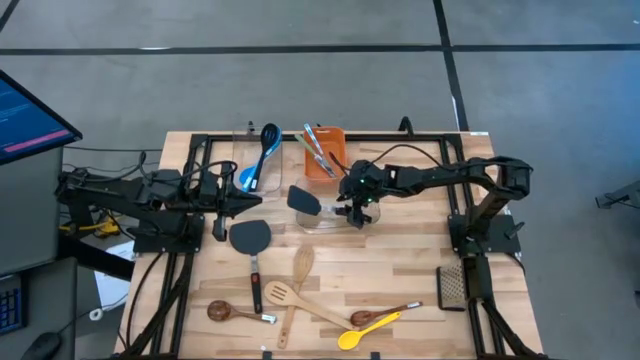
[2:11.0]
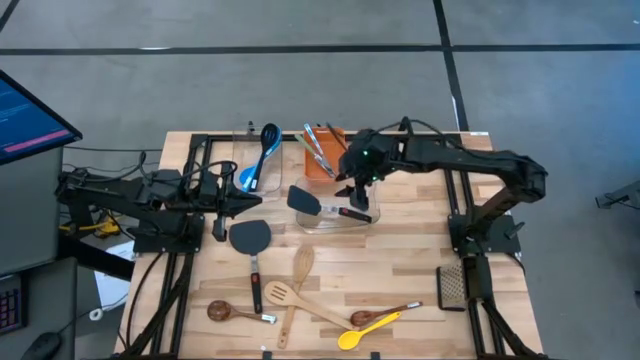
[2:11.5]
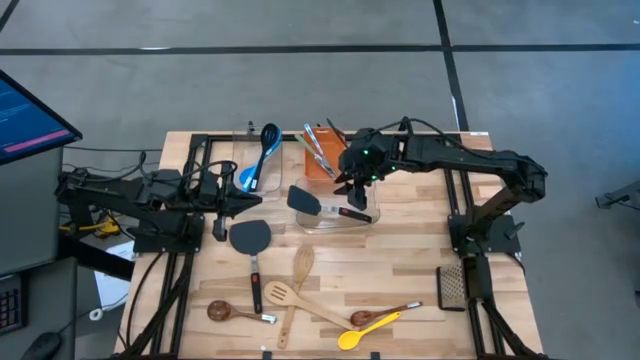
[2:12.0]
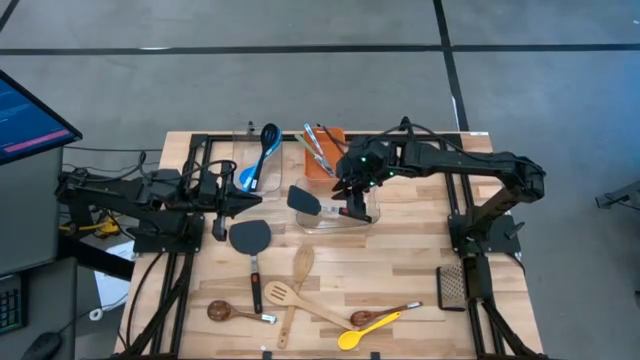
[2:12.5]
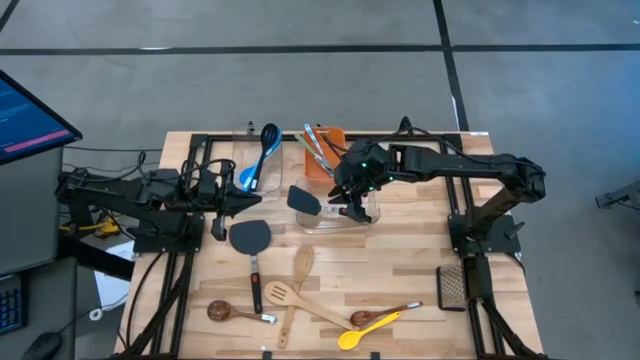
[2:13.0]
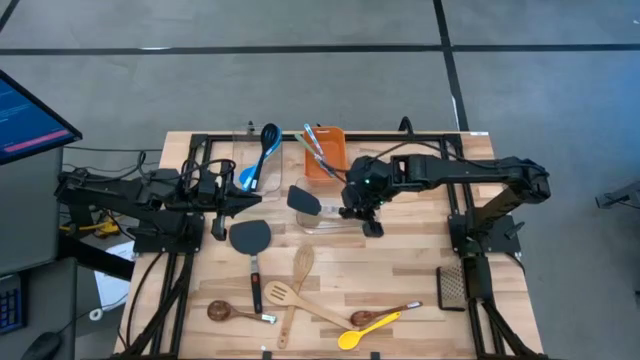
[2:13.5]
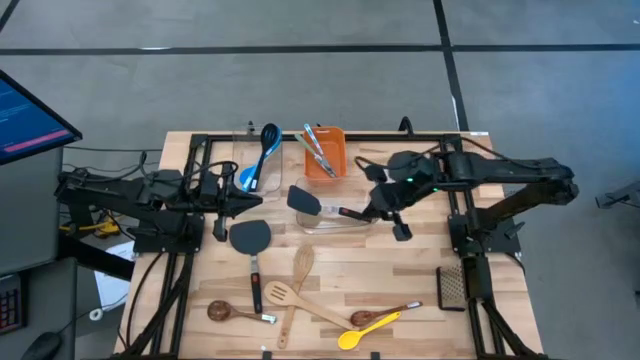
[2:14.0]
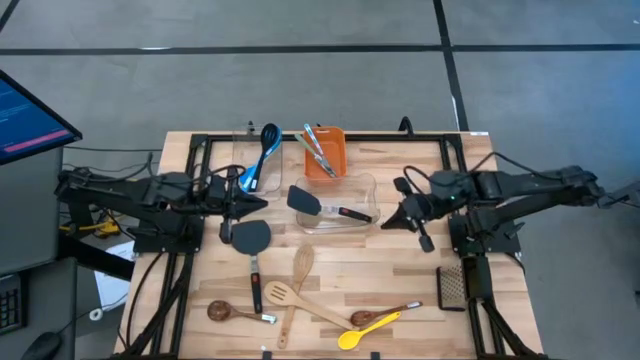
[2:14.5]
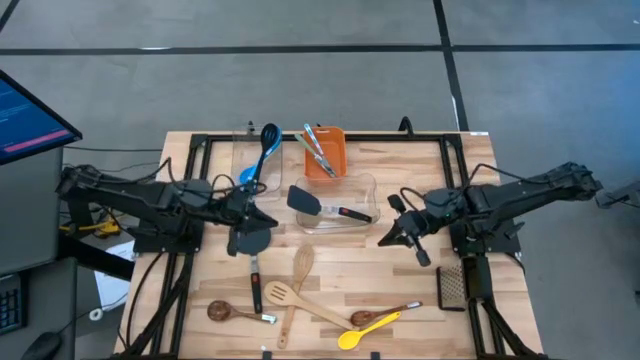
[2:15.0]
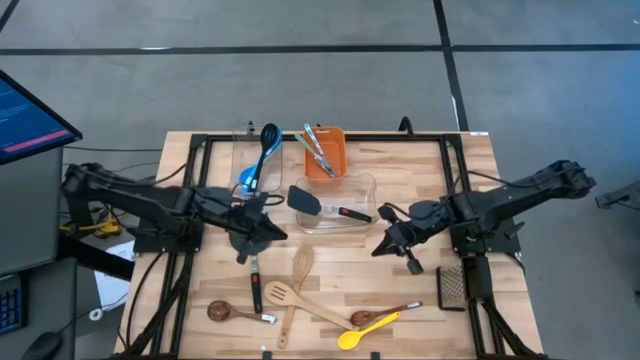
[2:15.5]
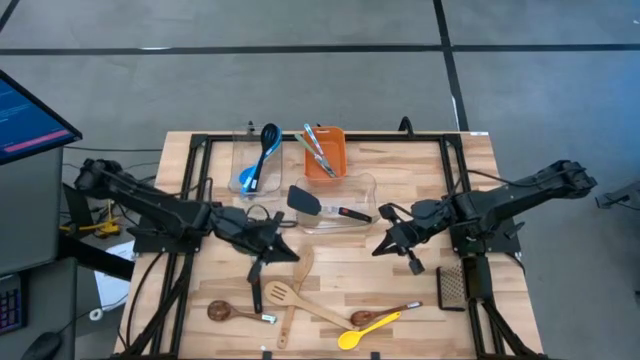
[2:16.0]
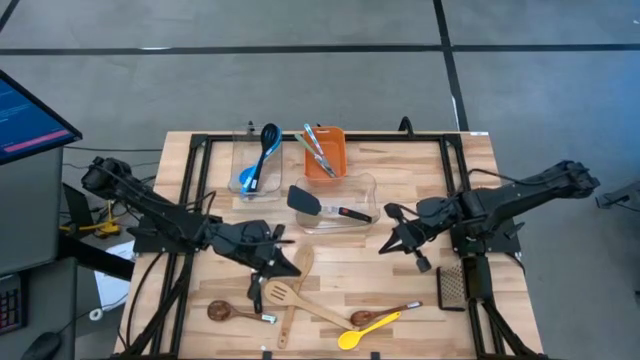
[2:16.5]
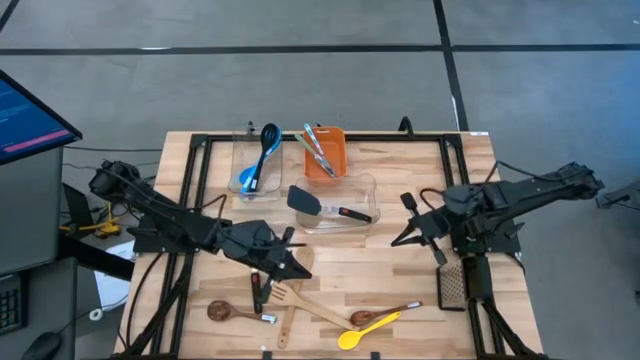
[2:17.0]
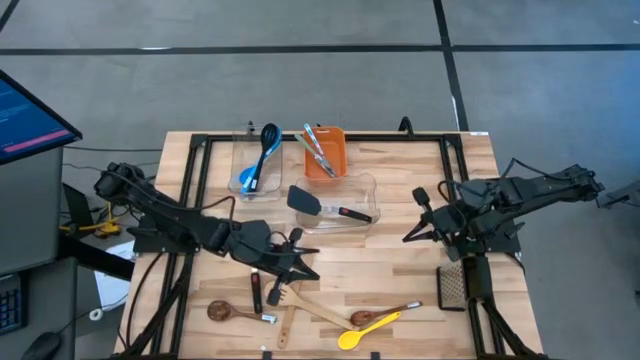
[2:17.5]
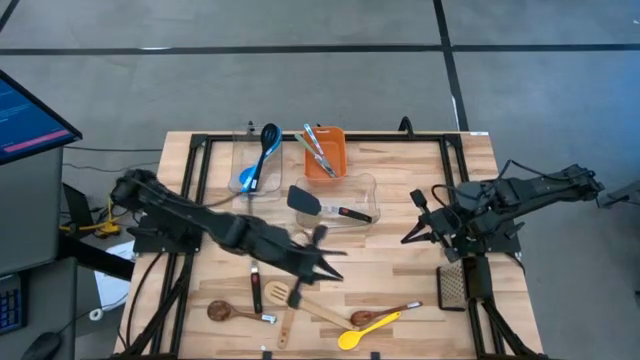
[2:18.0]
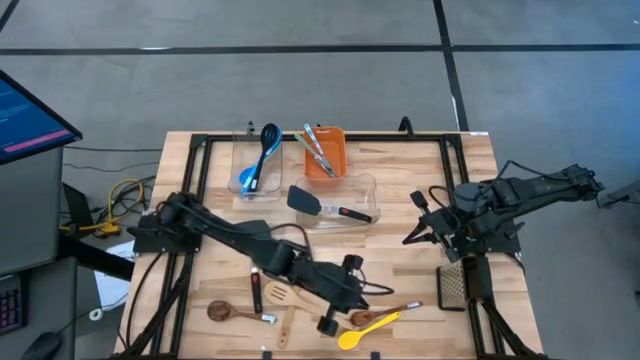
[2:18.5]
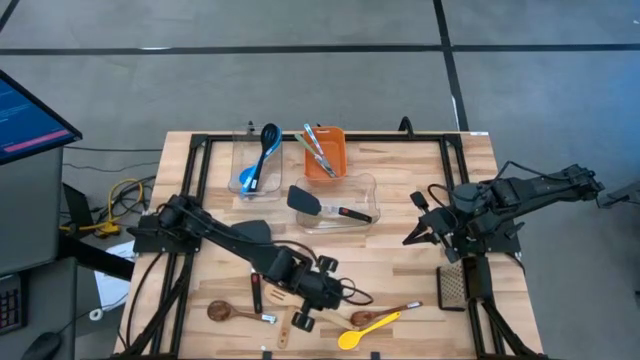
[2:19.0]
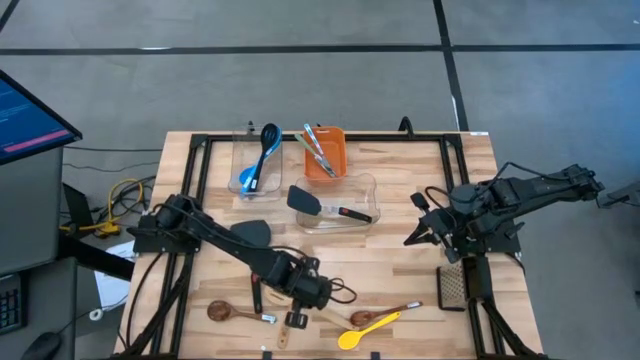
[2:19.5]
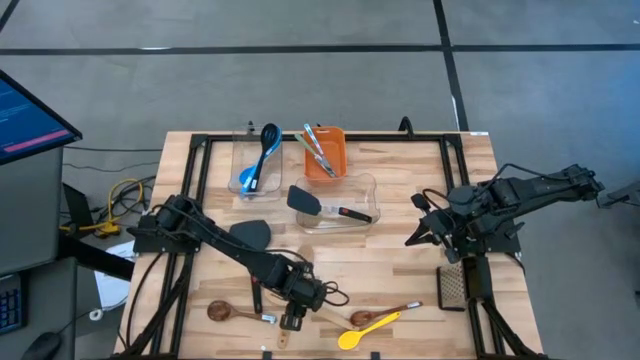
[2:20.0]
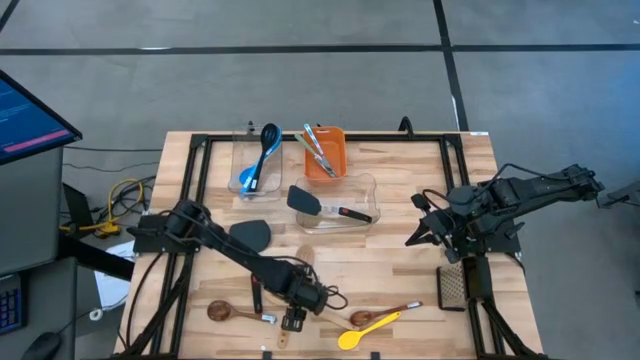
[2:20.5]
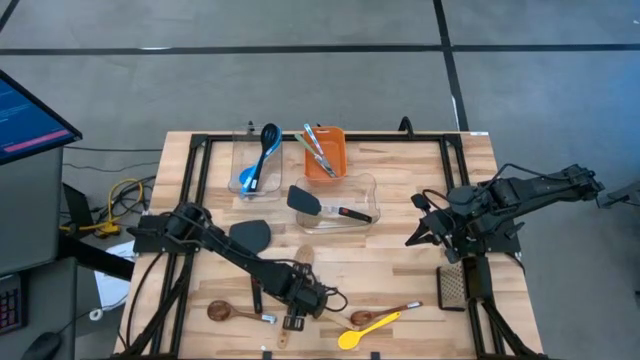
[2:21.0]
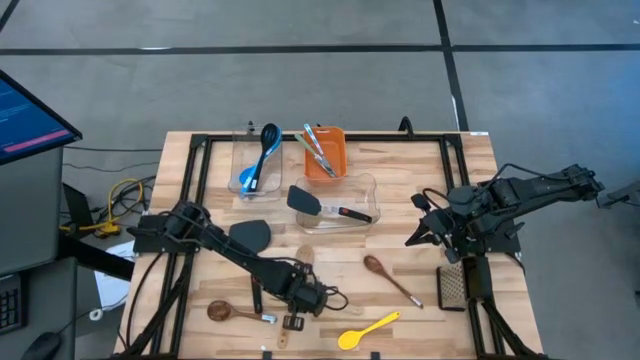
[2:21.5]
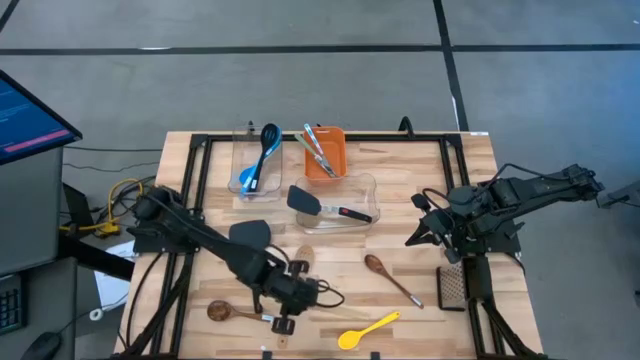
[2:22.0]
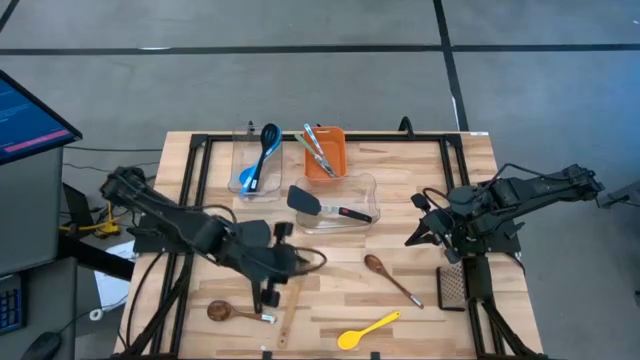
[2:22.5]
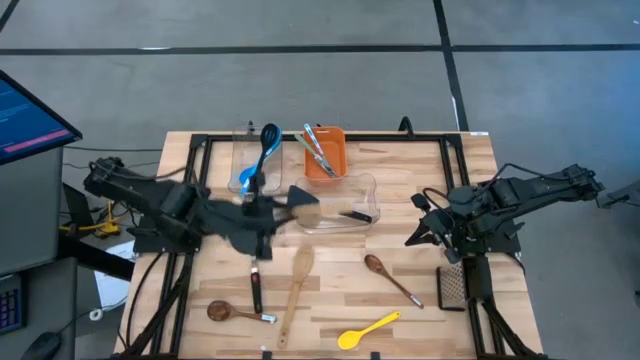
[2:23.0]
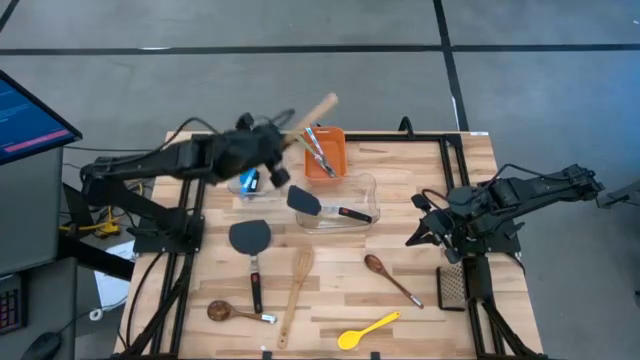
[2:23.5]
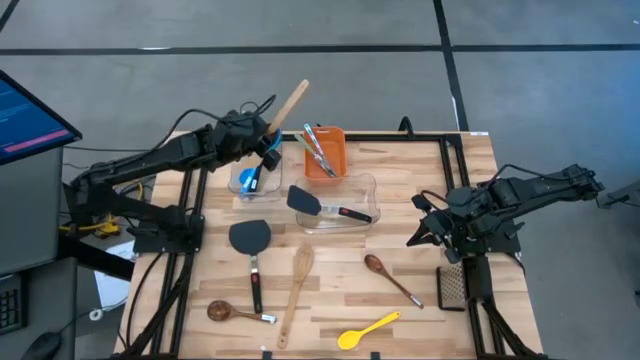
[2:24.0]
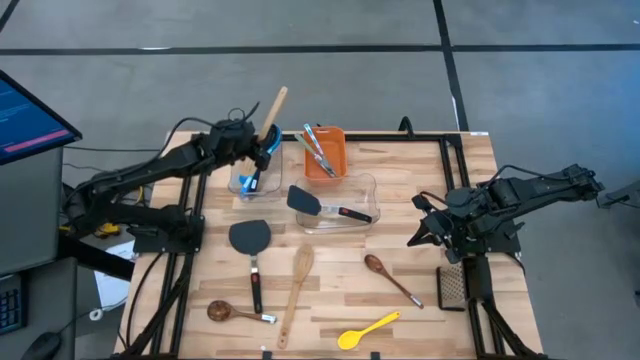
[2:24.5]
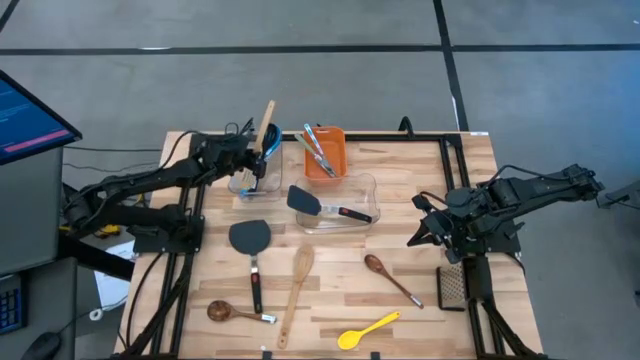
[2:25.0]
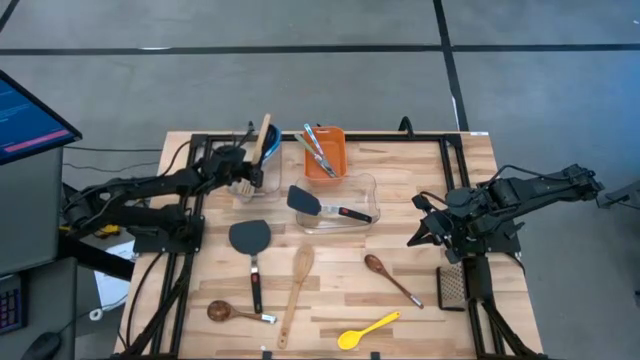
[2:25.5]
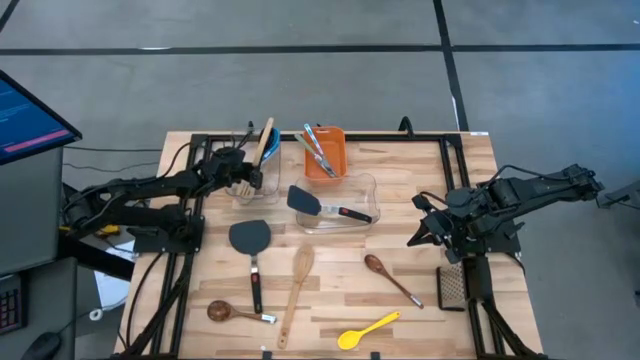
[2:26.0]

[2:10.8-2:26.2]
Task: Pick & Place Kitchen Items
Put the bottom light brown slotted spatula into the top transparent bin

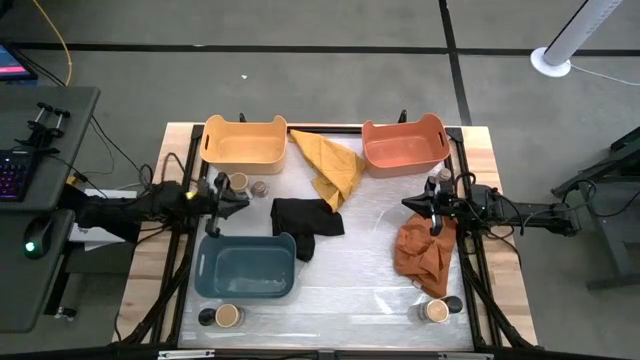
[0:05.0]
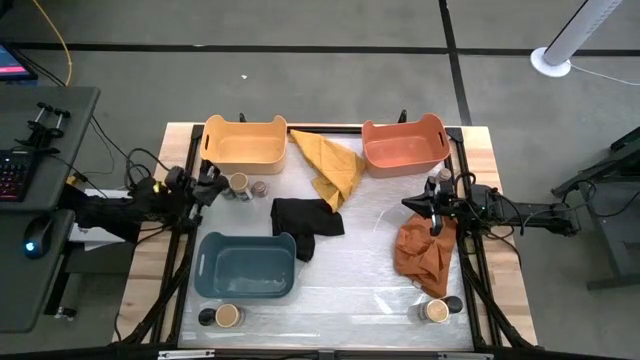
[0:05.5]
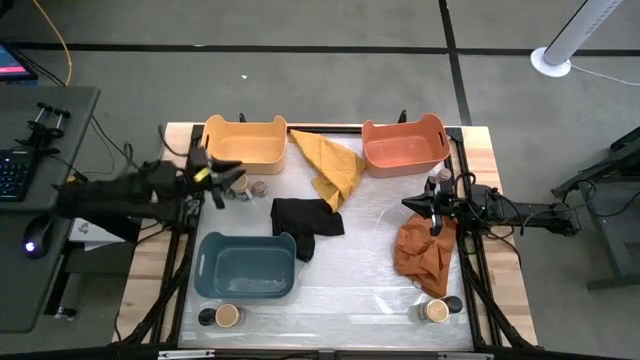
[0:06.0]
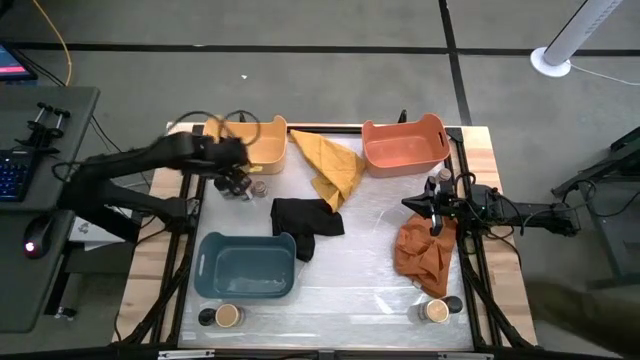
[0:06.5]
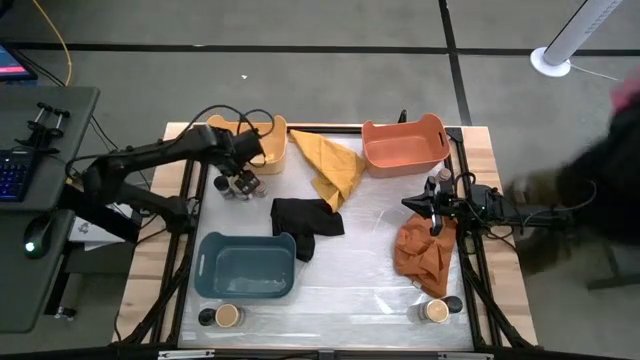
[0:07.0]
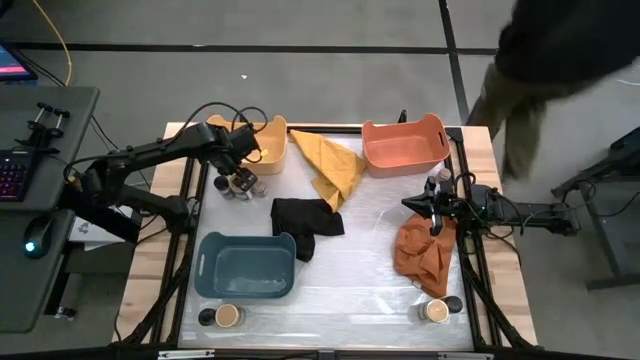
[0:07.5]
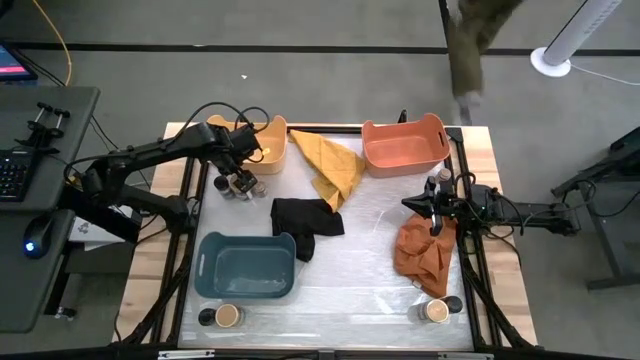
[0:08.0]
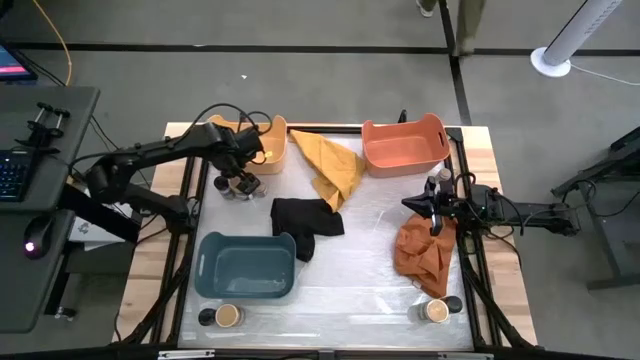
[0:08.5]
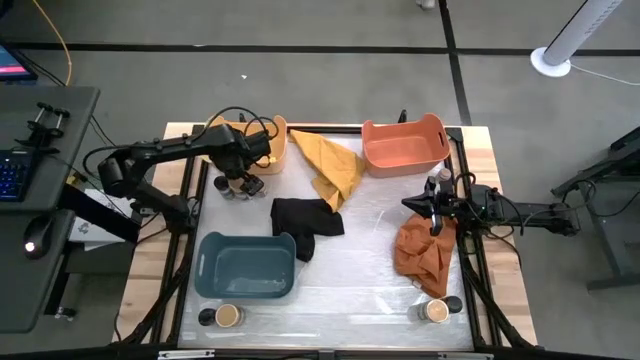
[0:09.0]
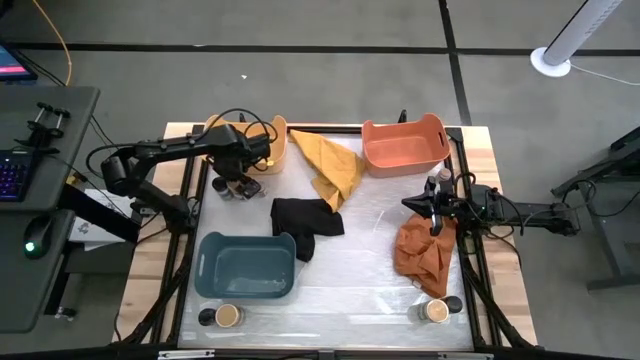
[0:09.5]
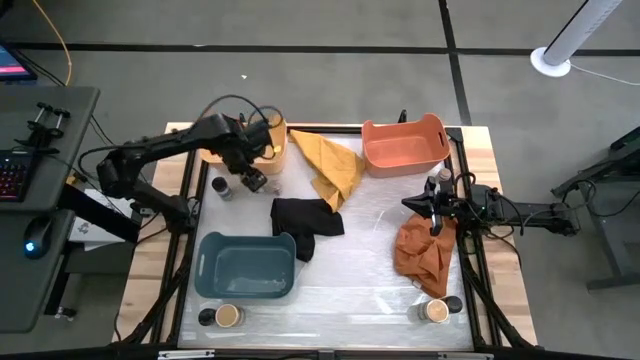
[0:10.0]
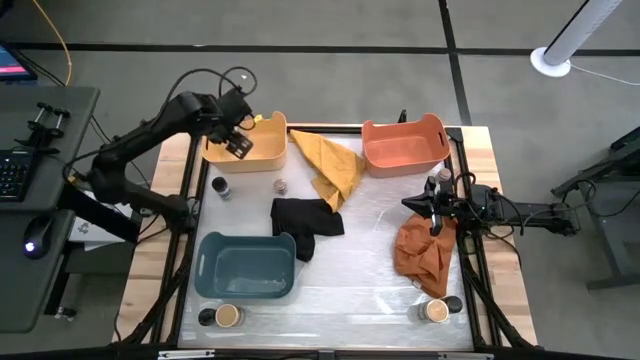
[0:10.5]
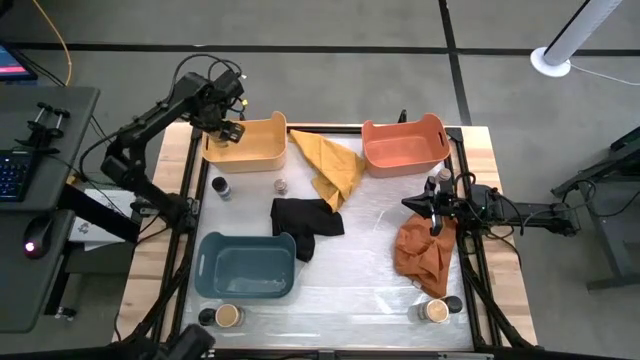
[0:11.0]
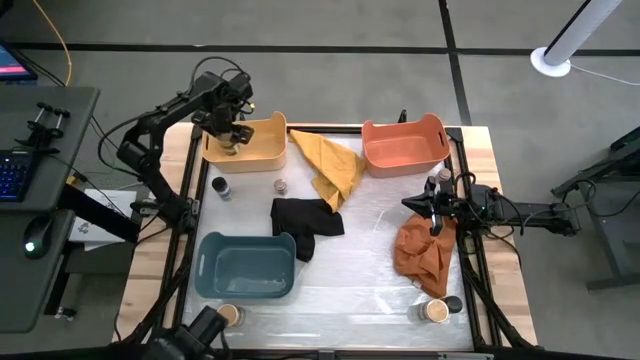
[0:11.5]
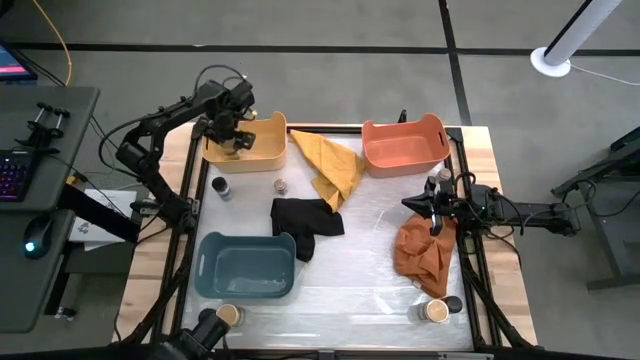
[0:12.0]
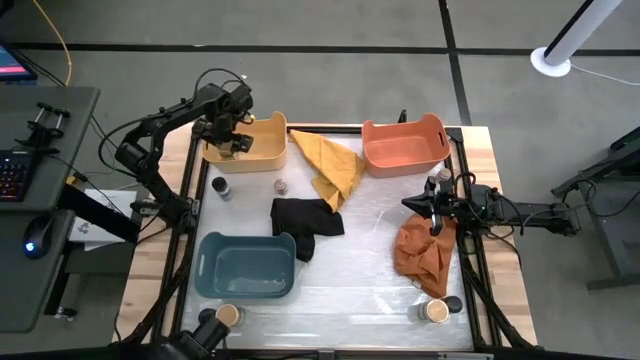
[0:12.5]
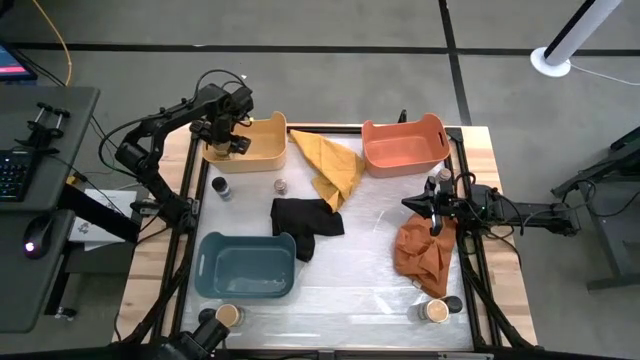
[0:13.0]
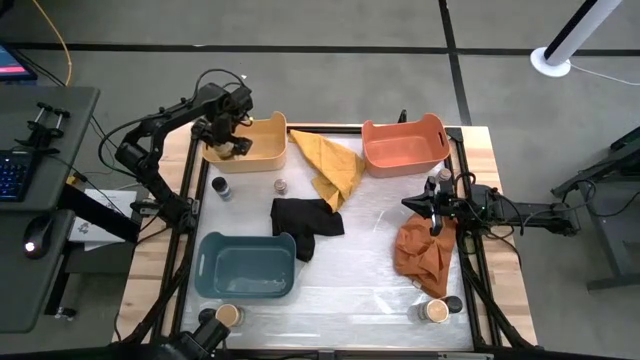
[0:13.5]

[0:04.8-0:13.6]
Task: Sort spices by type
Put the top left gold spice bottle into the yellow bin
